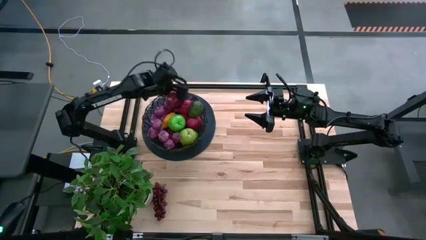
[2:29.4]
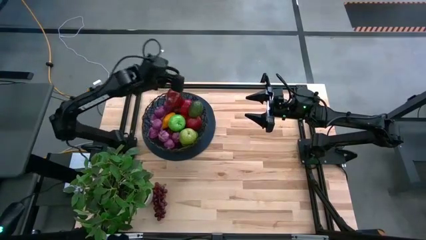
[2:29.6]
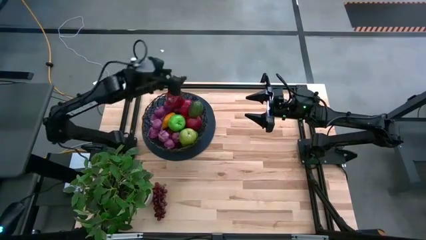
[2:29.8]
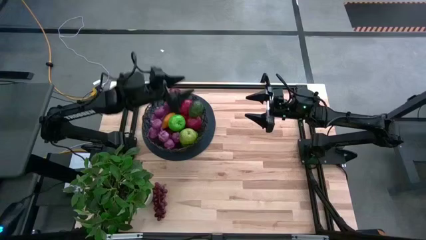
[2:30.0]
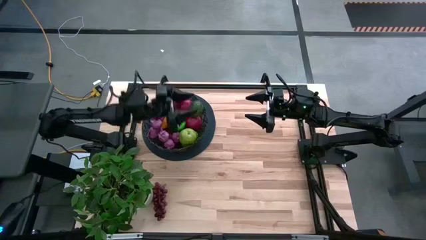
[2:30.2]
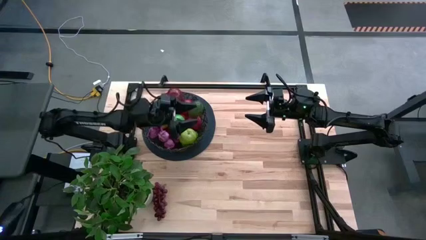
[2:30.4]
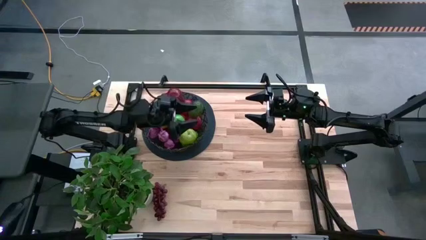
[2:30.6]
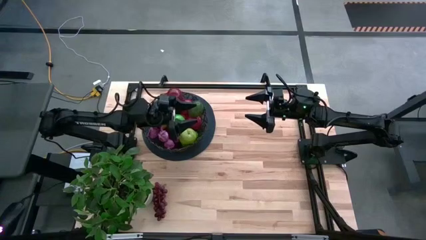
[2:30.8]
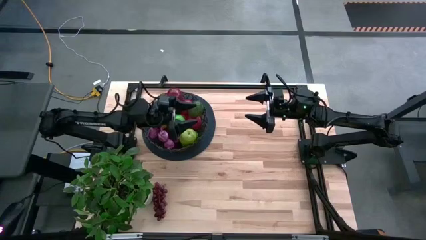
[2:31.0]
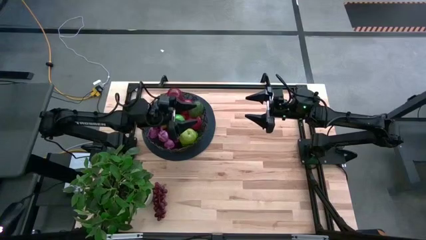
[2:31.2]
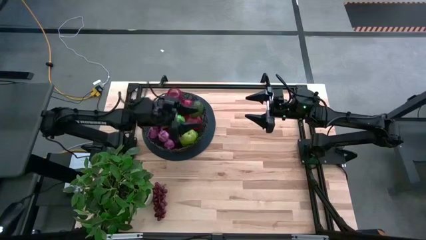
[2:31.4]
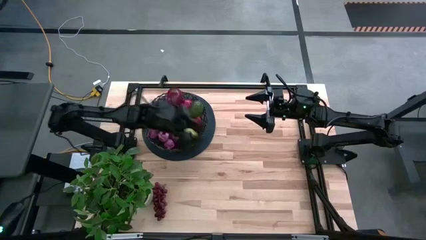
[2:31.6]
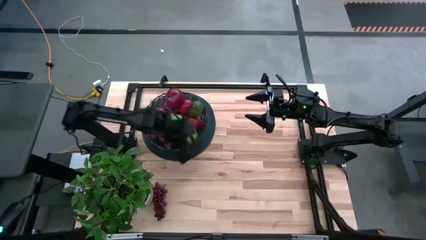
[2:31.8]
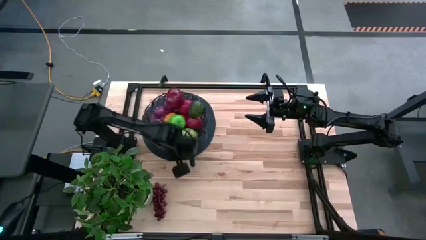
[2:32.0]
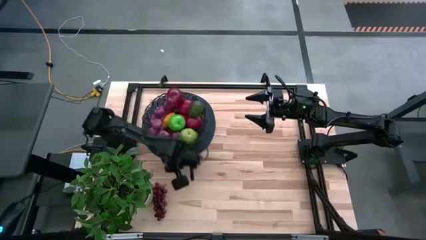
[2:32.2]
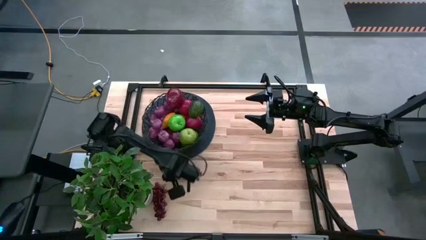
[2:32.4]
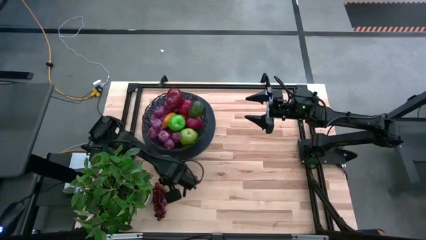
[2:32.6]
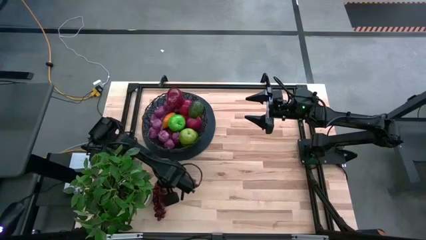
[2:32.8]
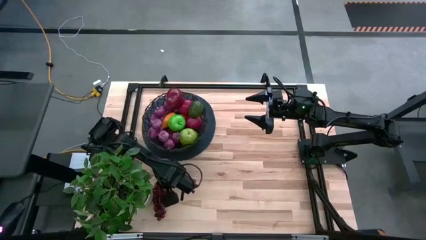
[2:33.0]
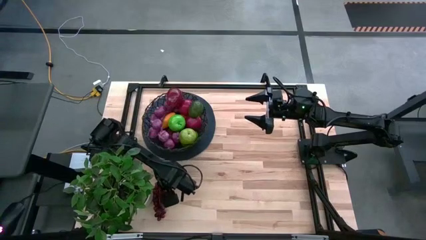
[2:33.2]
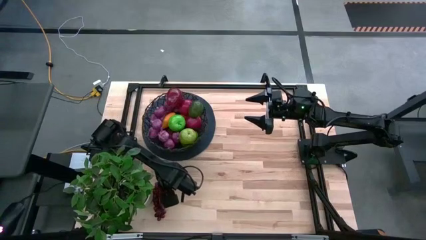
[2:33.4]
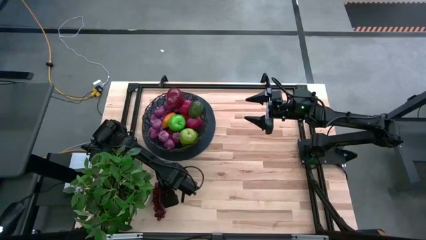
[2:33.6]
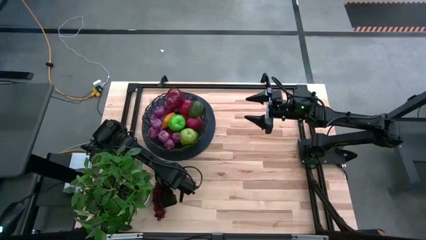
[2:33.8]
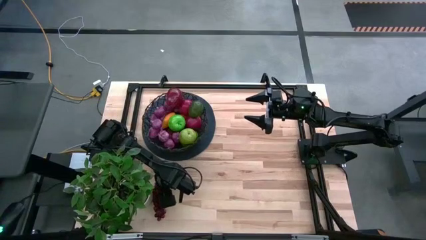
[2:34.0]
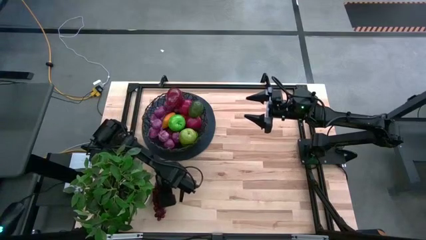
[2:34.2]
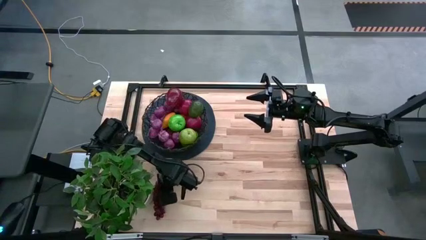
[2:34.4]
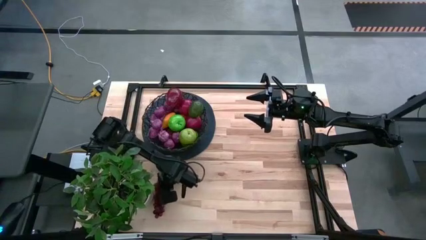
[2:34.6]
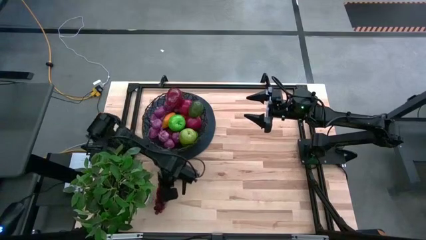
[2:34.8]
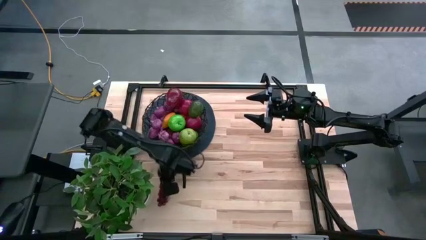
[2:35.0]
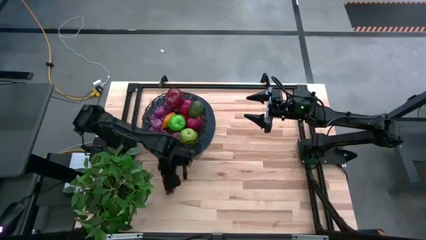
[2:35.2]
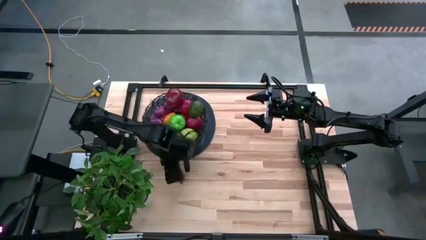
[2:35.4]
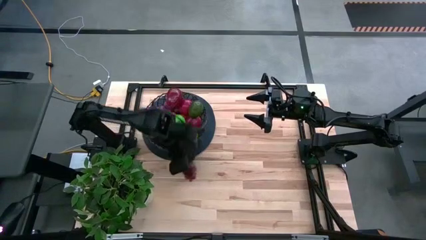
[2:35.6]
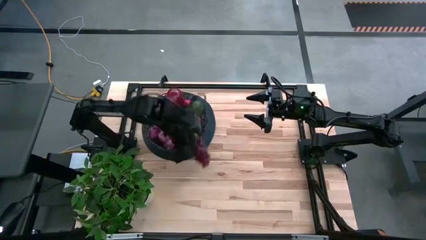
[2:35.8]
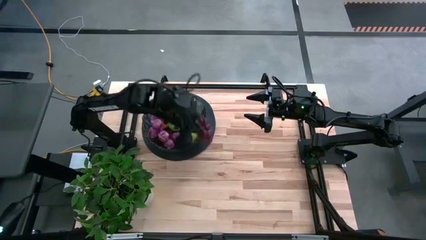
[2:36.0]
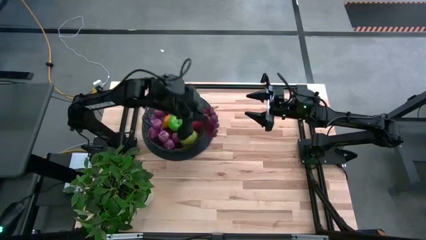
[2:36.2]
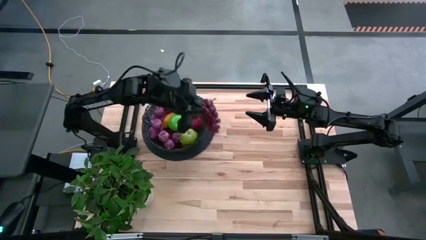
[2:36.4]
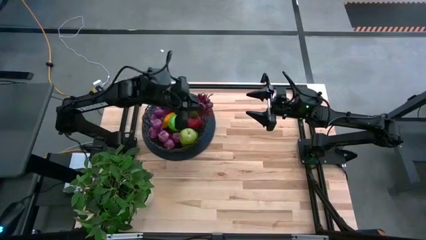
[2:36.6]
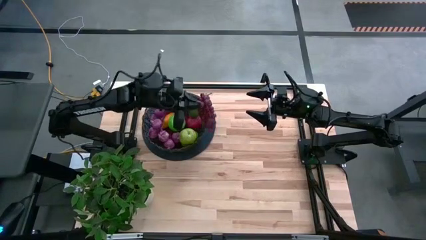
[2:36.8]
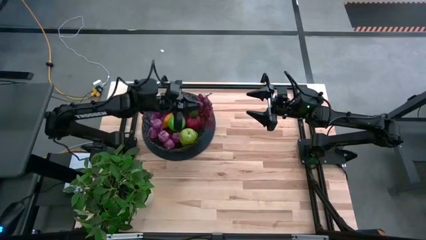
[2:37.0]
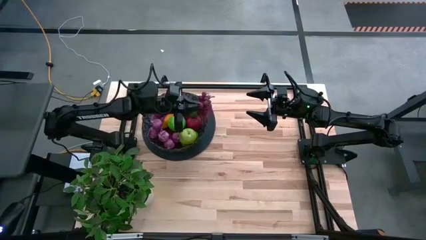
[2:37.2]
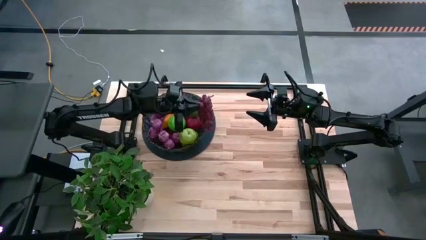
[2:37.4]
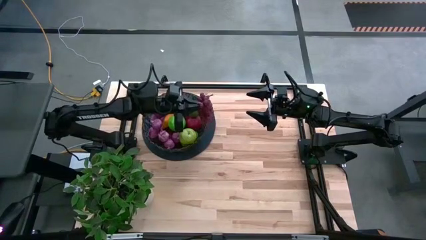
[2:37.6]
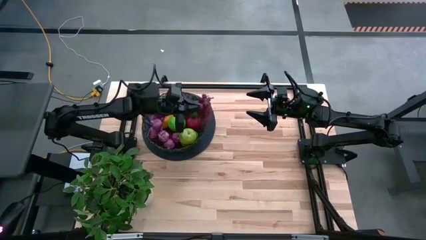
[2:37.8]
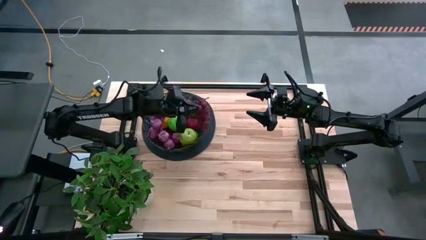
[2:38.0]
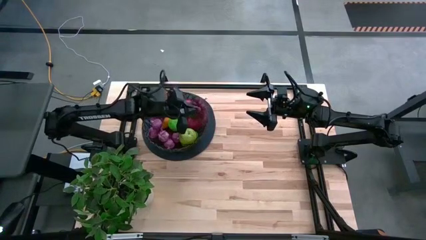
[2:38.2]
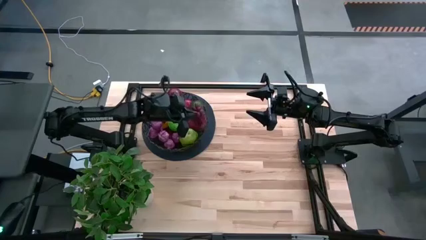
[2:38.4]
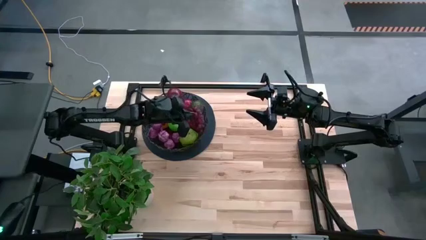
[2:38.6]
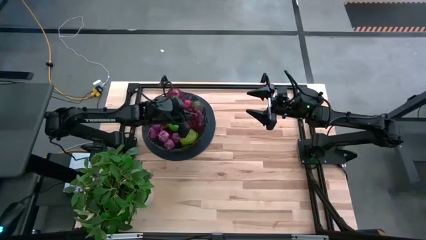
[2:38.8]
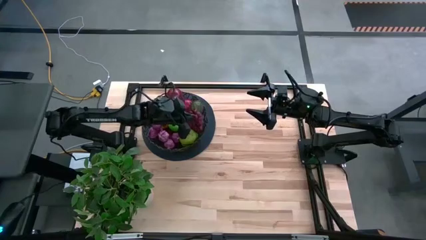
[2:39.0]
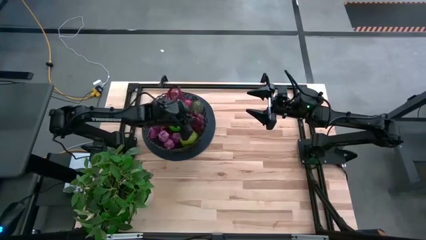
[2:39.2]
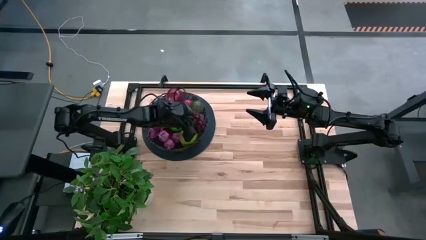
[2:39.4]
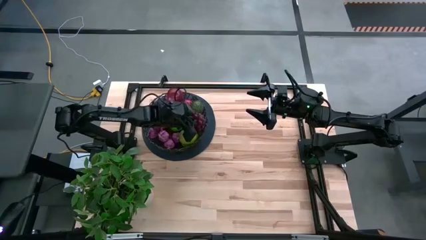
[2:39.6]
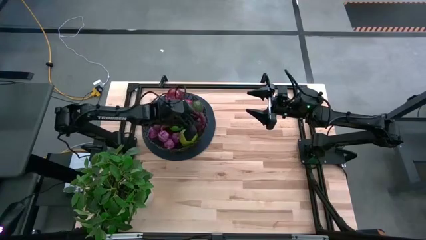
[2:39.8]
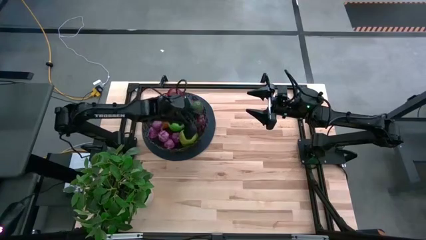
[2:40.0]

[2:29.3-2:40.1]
Task: Build produce basket
Put the grapes into the wire basket

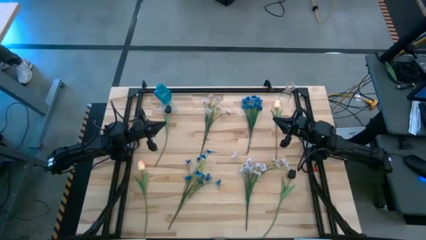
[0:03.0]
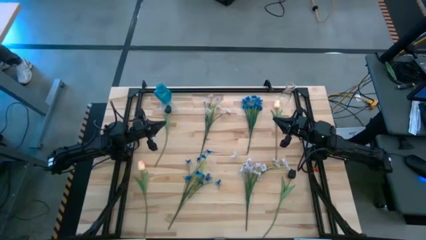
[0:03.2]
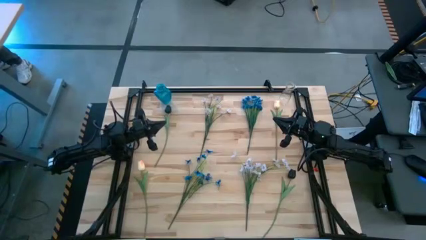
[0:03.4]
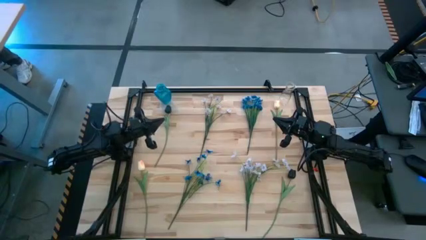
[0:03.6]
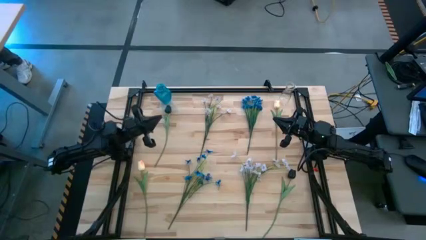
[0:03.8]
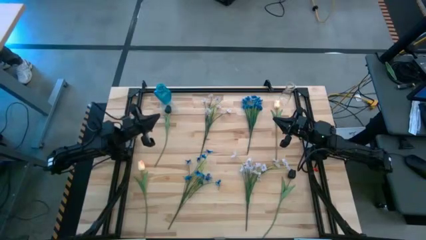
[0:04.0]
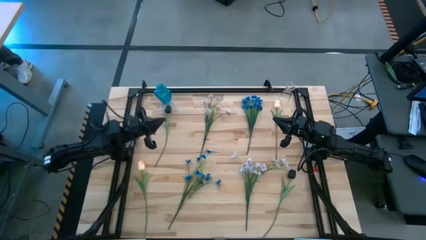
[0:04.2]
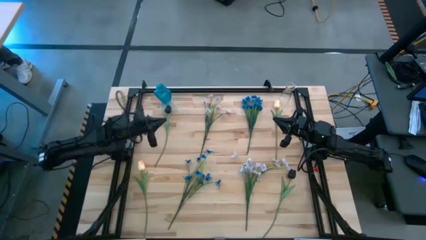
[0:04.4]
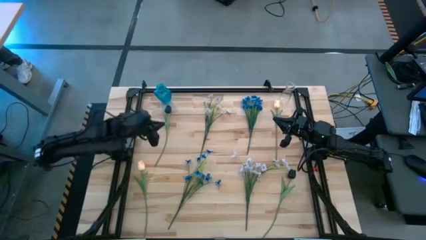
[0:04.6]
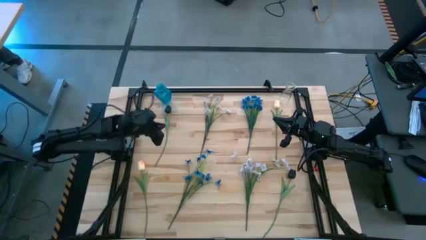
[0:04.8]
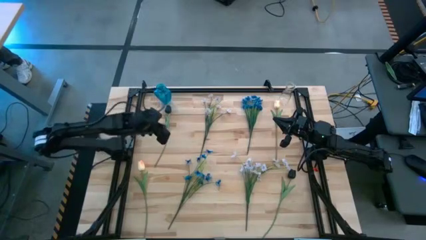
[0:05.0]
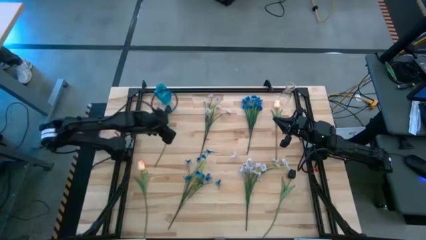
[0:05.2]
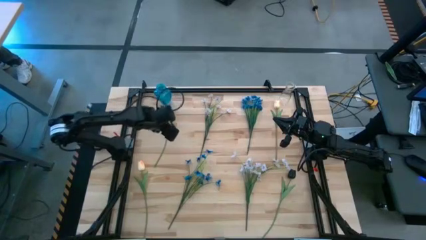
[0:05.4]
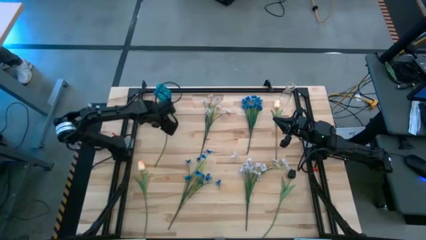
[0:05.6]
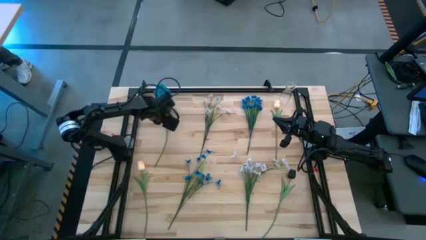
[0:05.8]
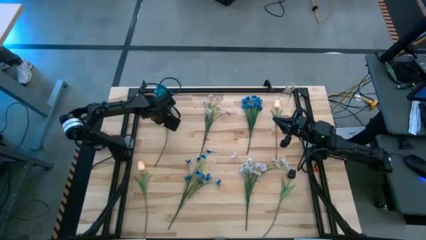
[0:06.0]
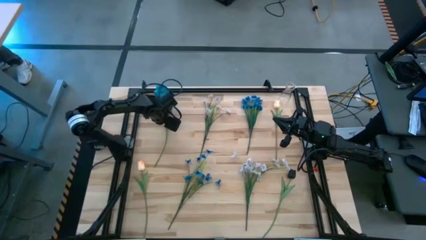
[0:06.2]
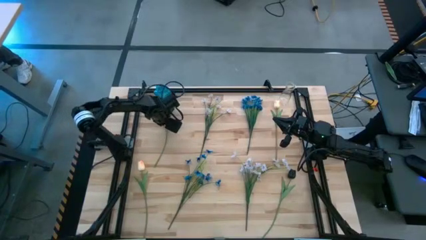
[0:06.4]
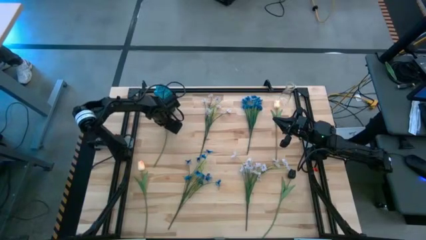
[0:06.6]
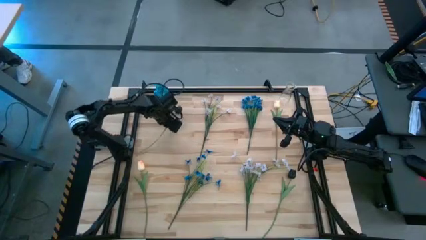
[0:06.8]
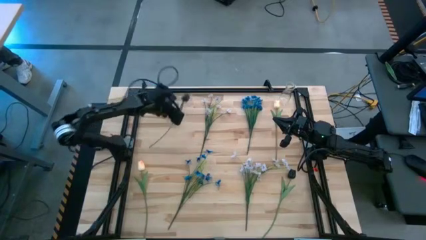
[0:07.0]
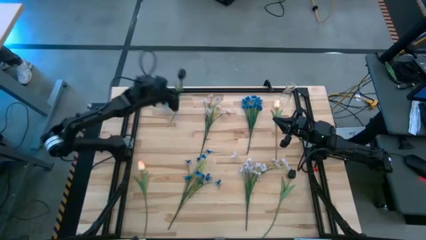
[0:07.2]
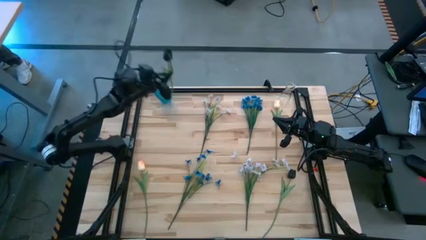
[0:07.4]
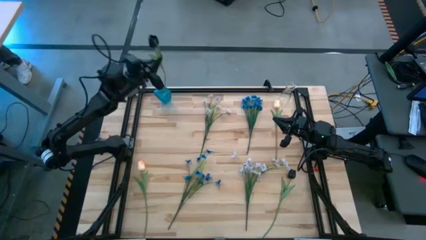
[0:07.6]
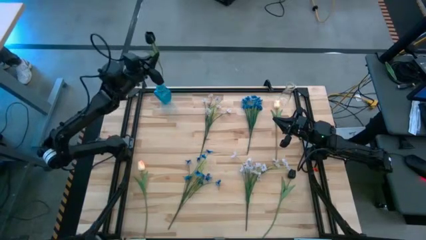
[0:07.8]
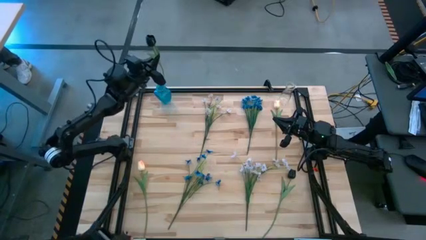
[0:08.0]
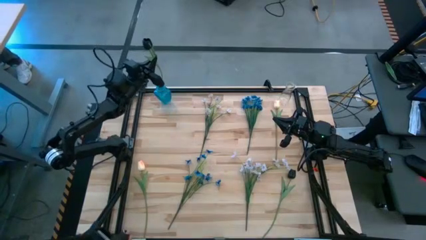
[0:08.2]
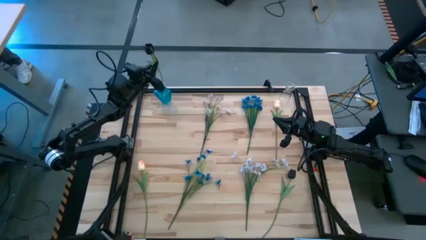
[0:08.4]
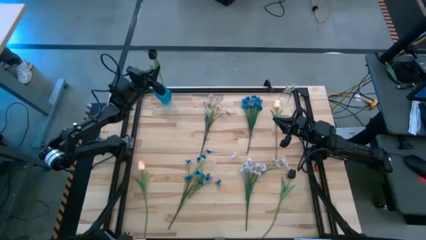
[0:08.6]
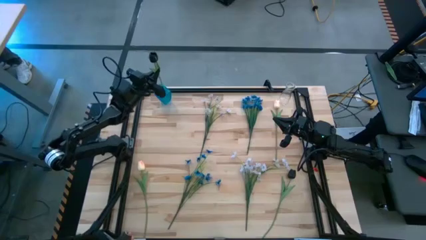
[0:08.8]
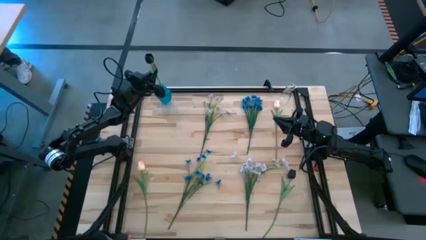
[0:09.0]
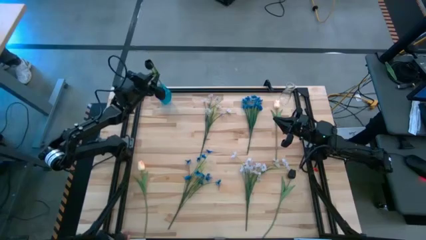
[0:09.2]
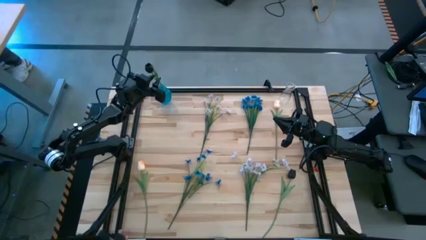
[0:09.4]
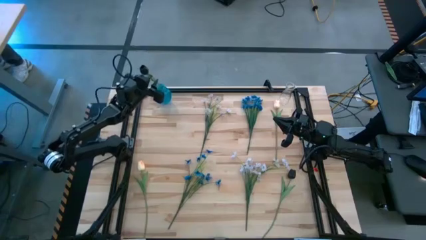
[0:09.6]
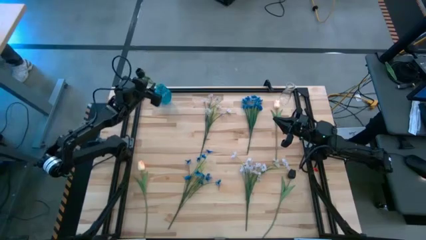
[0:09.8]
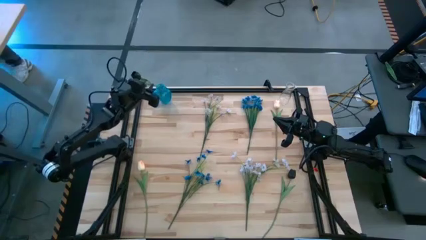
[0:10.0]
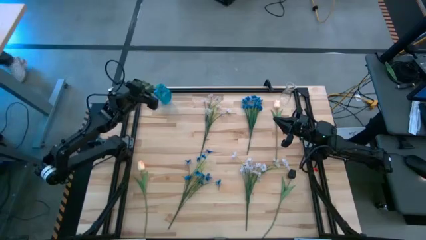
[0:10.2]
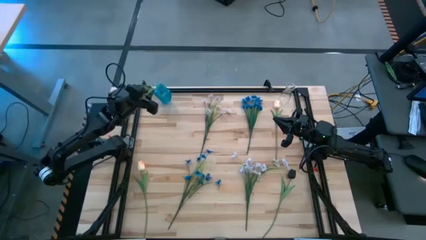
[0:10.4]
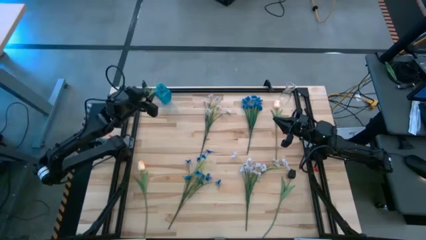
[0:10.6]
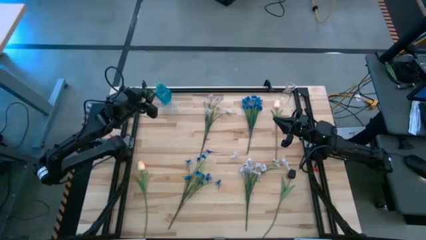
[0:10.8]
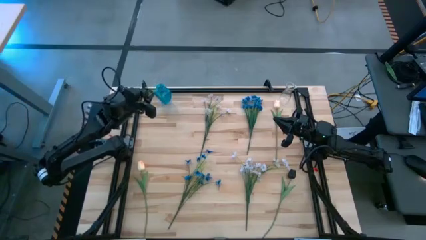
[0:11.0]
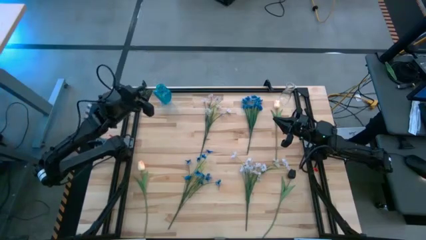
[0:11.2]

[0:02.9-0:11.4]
Task: Sort flowers into vase by color
Put the top black tulip into the blue vase
